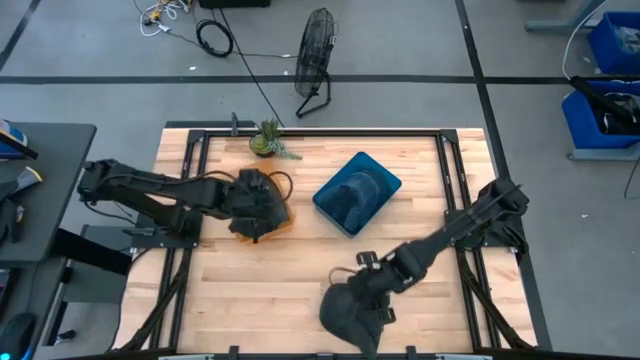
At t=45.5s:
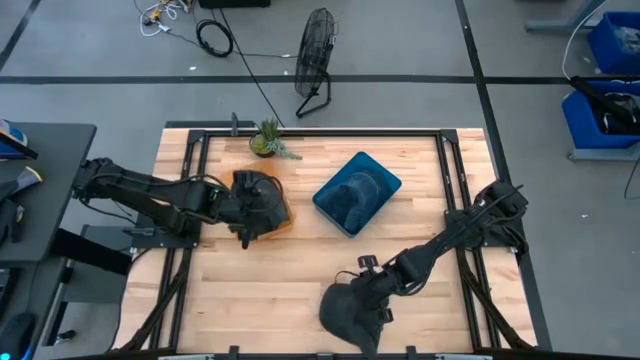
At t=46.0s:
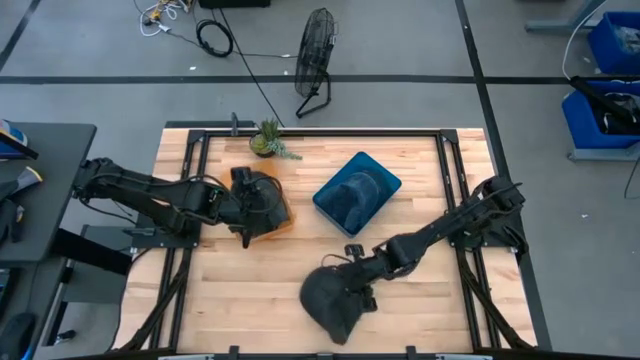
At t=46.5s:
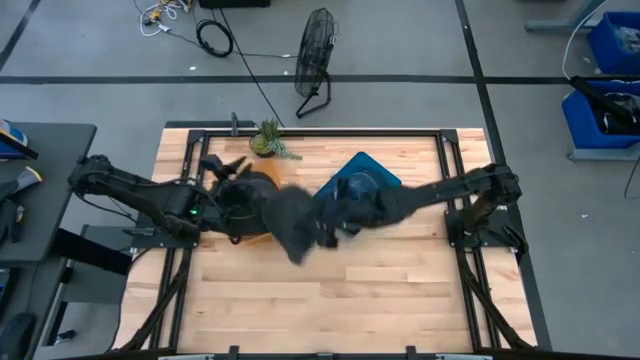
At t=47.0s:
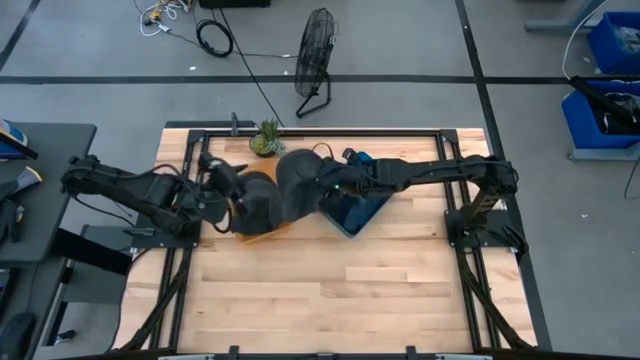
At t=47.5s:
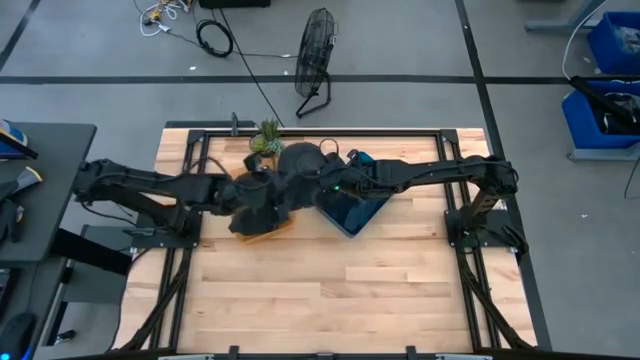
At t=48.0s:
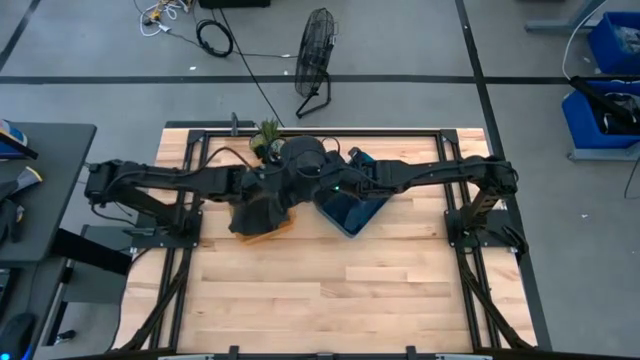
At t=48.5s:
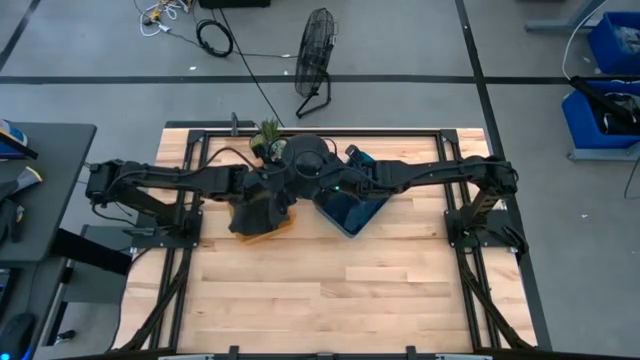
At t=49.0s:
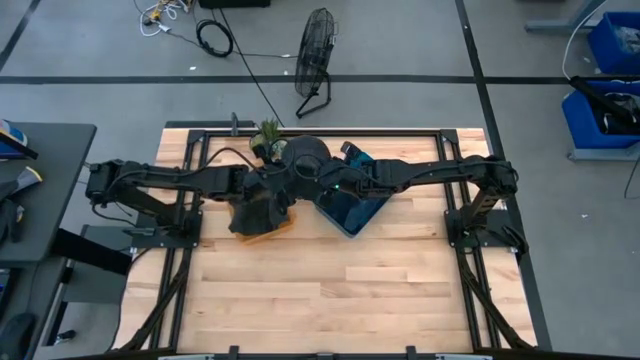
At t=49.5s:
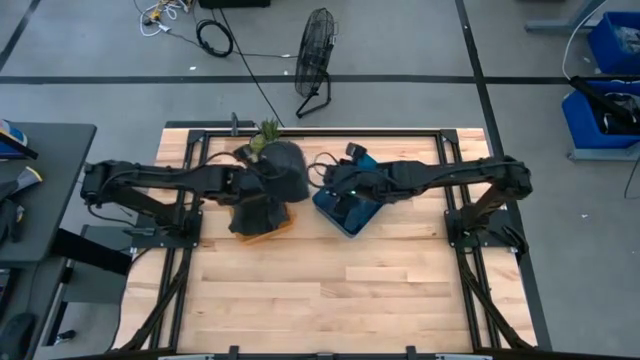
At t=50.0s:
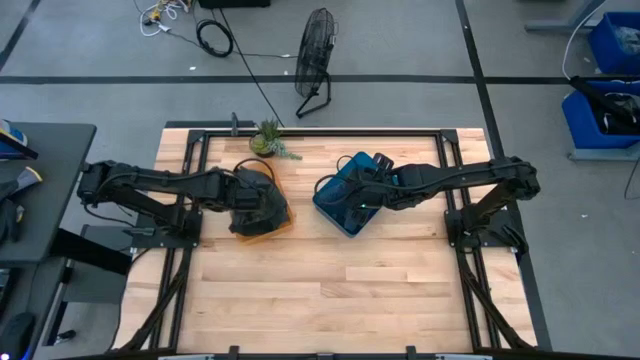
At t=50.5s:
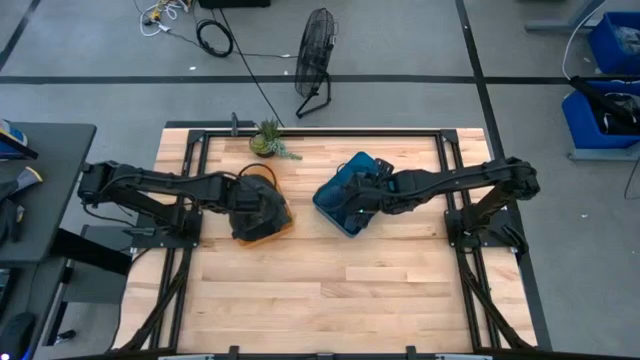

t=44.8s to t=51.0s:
Task: Pick & Place hat
Put the black cap into the orange bin

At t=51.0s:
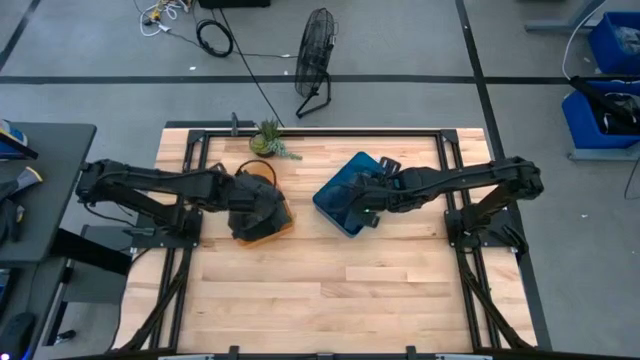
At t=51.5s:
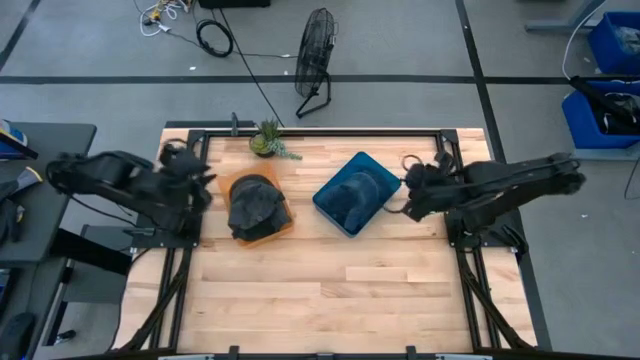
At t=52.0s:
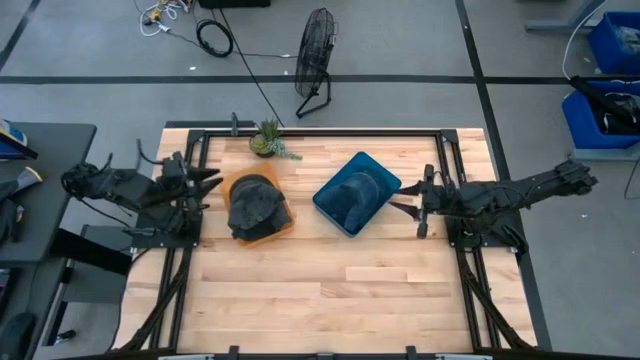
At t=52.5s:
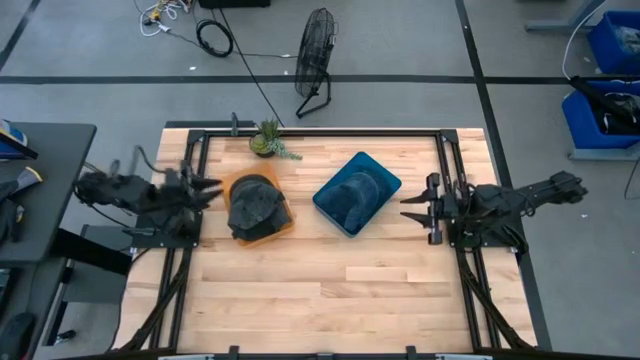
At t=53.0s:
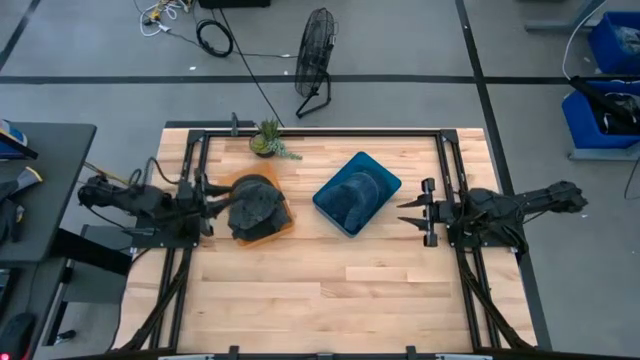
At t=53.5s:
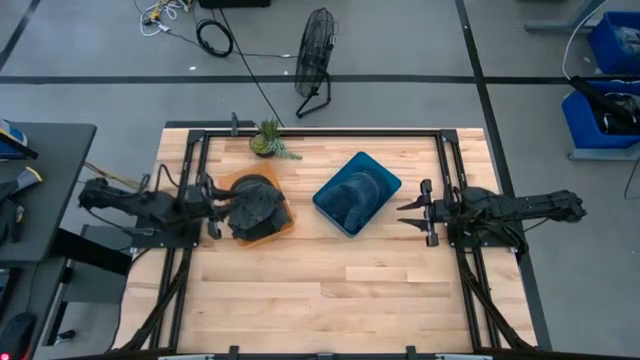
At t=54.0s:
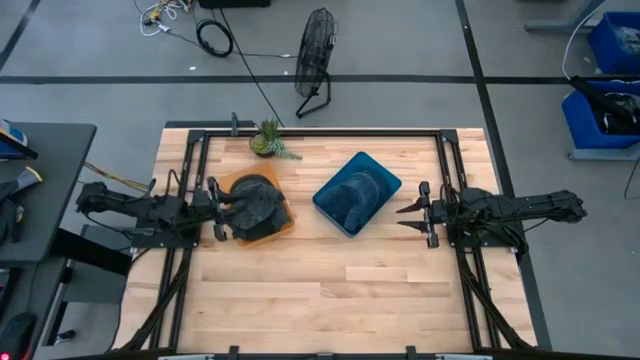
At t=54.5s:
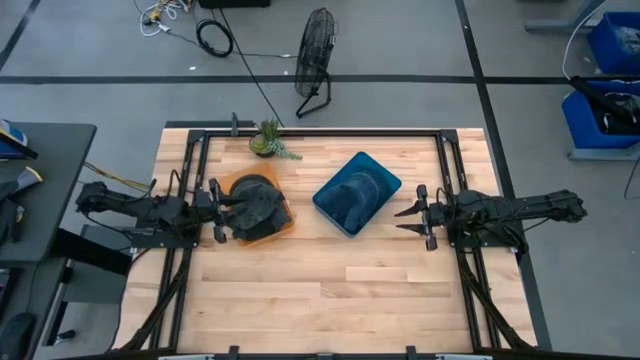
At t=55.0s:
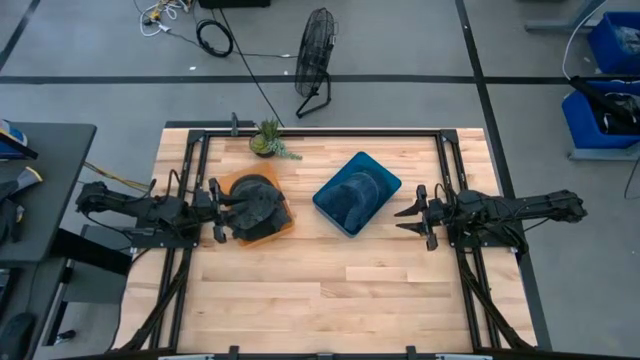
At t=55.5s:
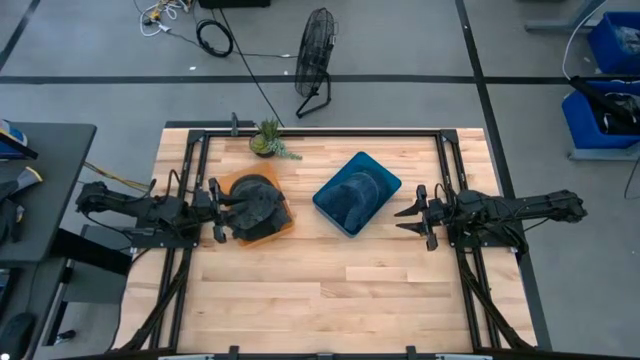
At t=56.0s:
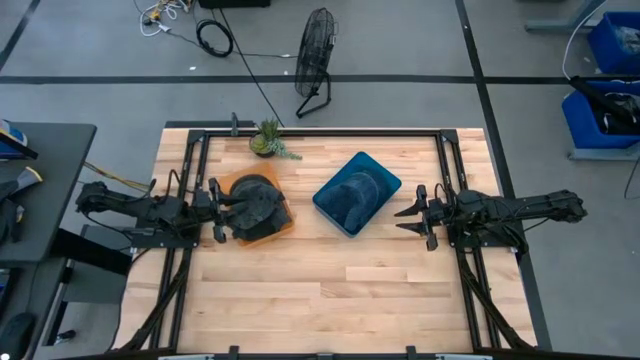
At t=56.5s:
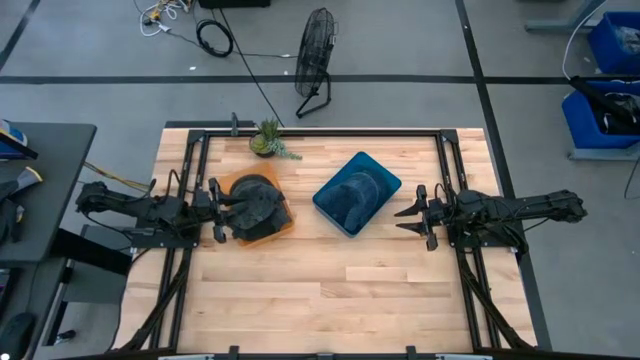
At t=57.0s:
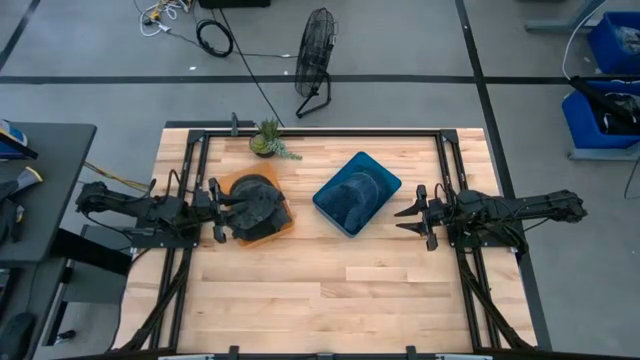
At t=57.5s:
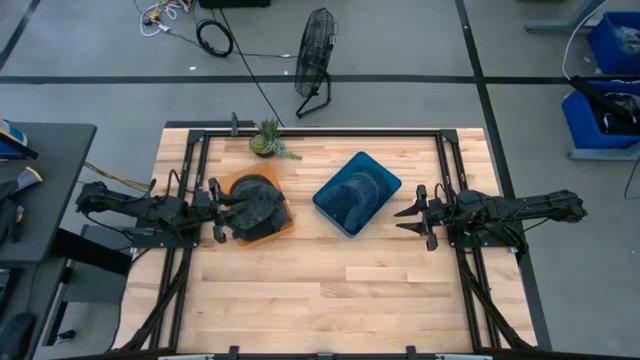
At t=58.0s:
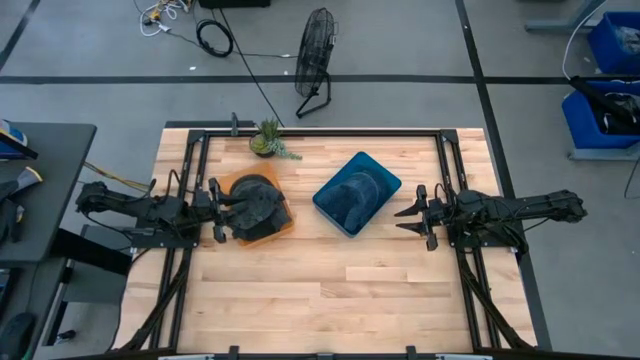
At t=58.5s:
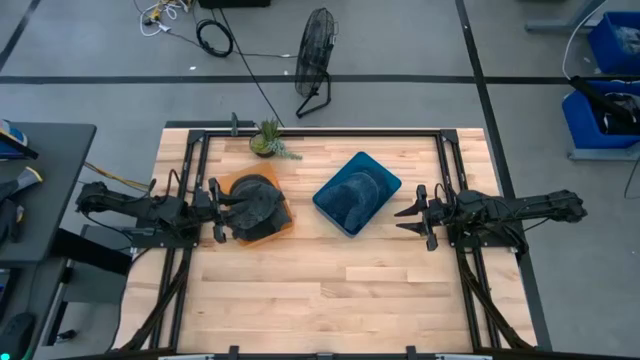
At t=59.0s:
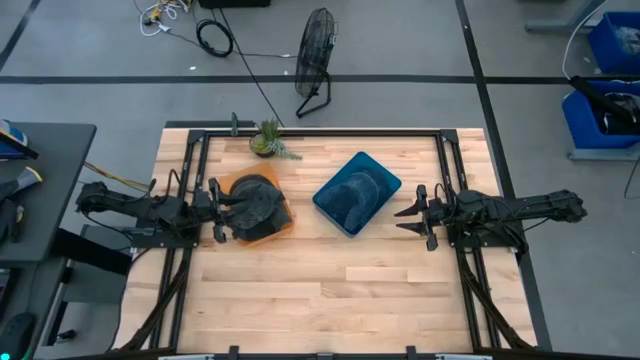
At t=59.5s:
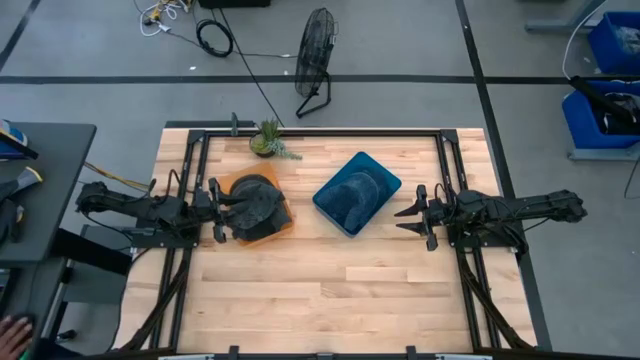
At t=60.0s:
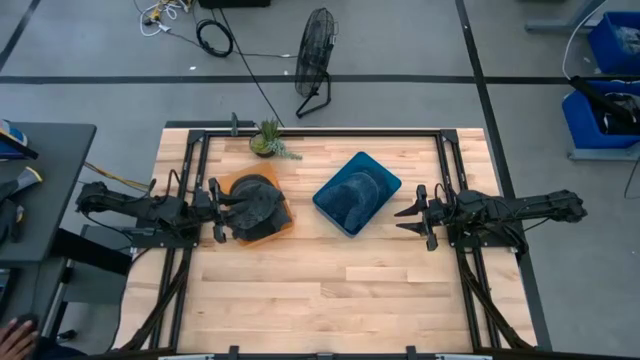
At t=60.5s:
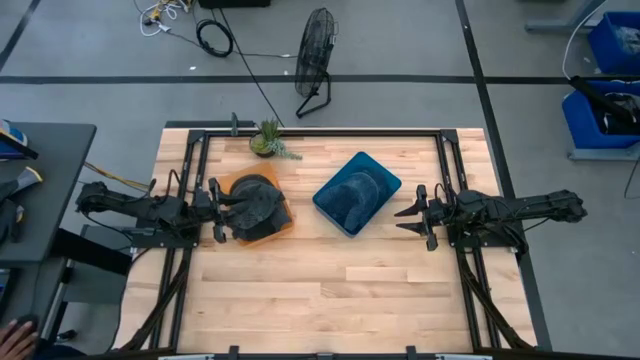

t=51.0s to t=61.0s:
Return to Home Position

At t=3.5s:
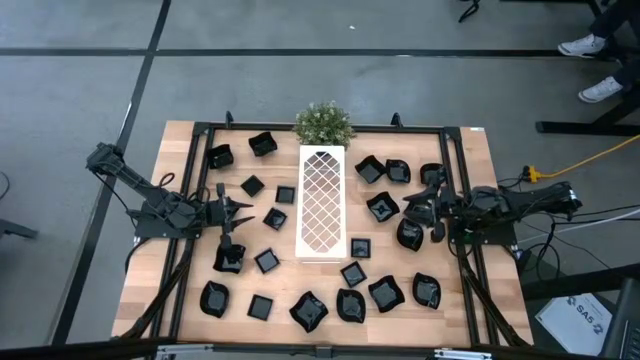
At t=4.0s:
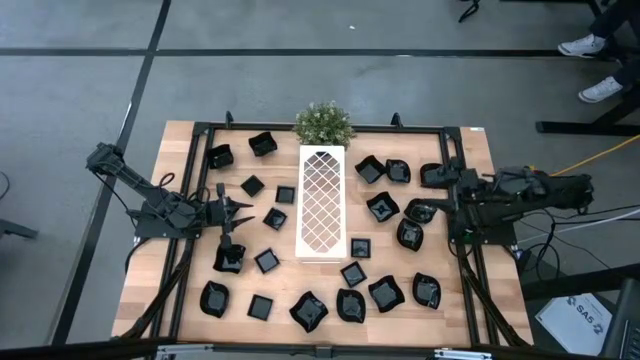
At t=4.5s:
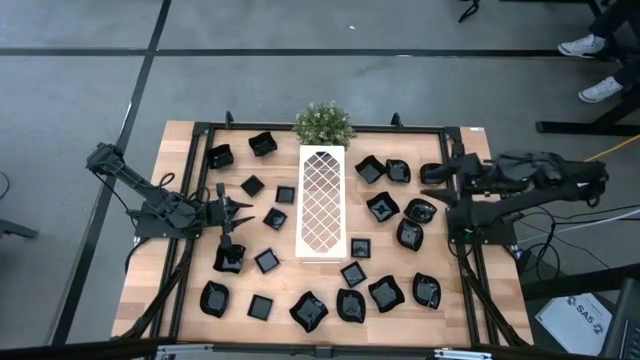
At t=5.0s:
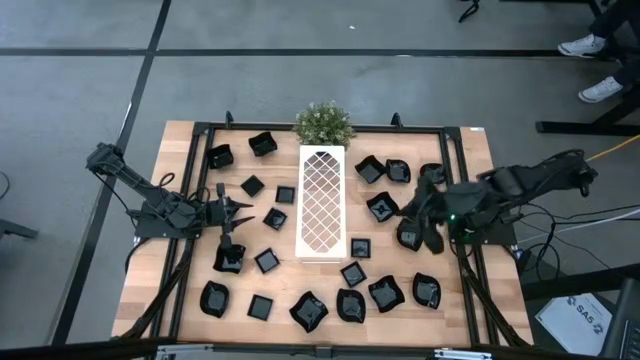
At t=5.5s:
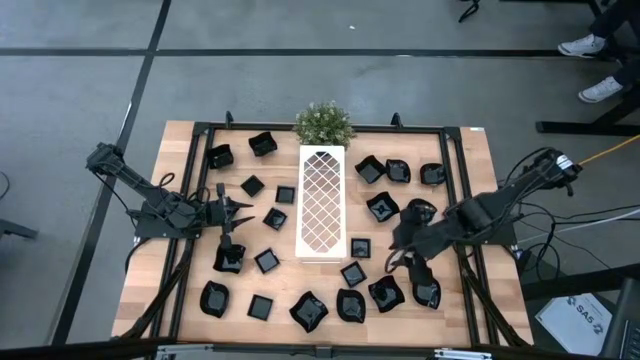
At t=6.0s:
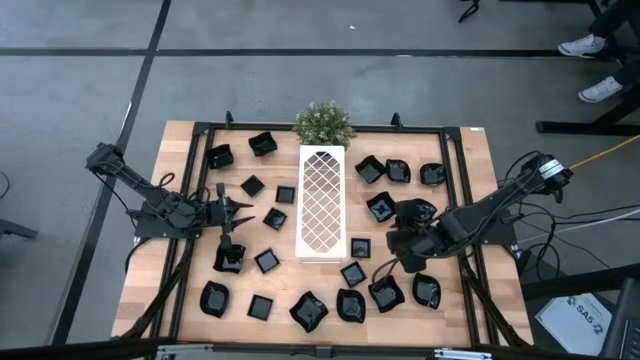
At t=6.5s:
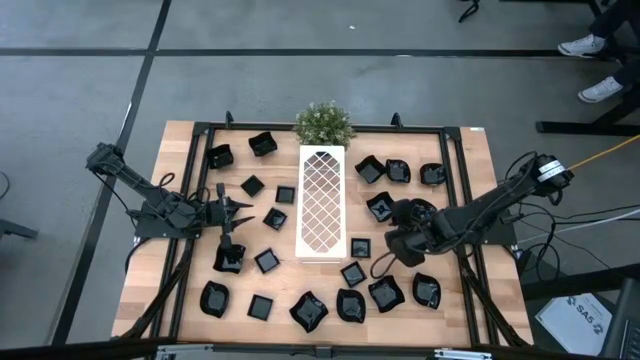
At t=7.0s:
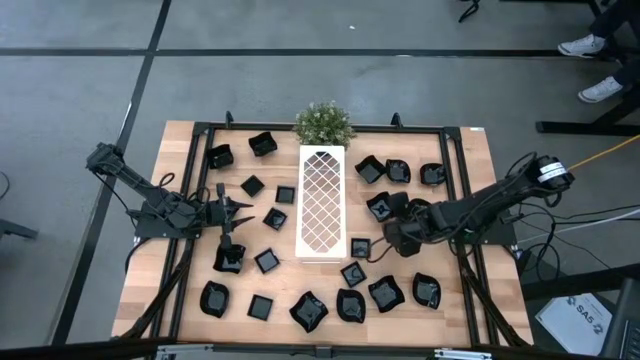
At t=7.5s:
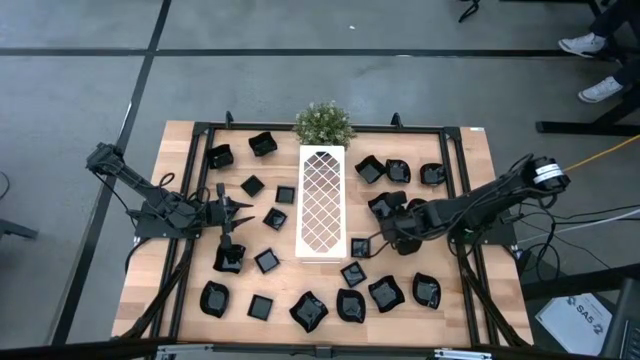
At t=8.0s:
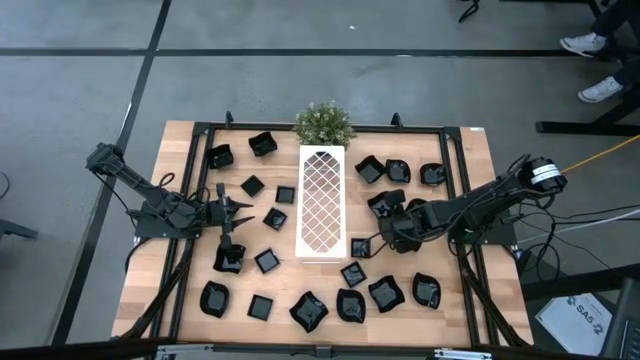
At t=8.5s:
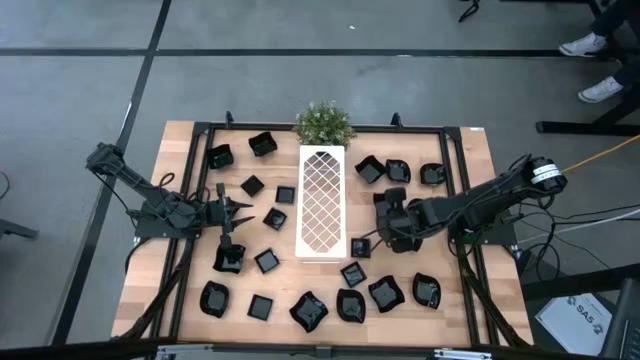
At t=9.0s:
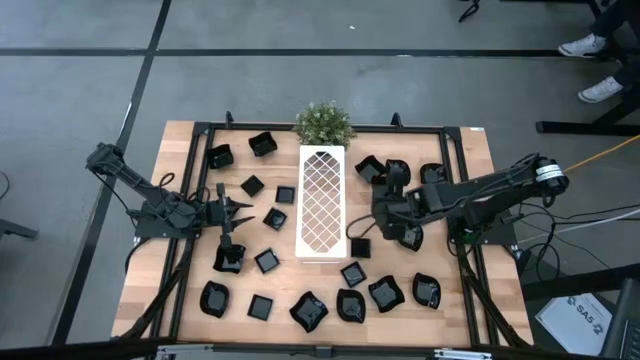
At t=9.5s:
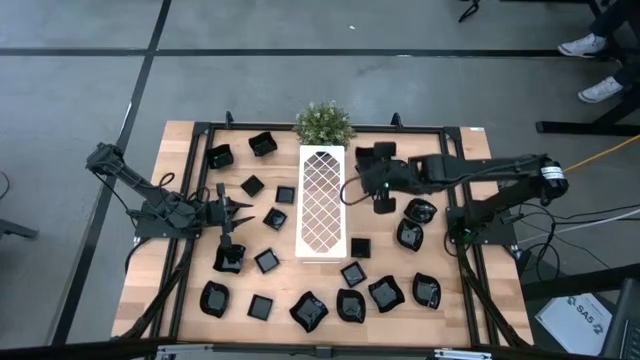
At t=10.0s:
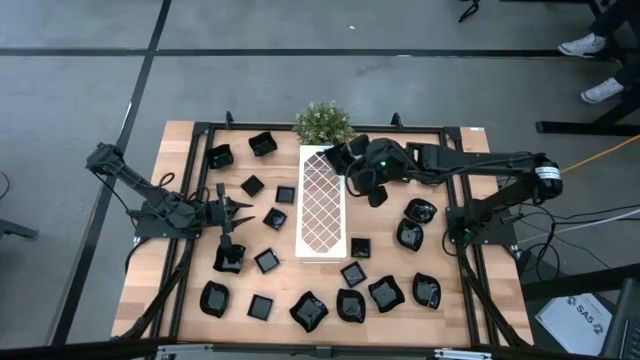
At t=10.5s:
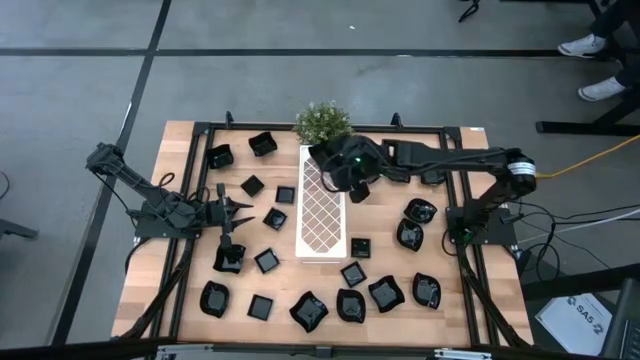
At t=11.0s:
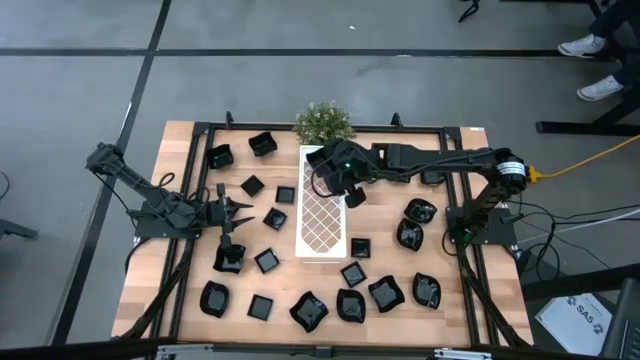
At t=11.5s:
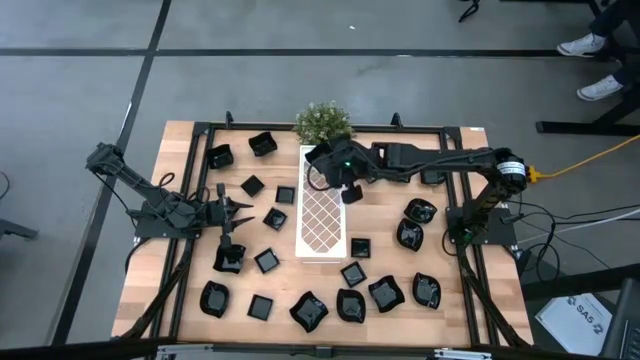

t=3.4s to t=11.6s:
Task: Pick & Place Mini shaped plates
Put the distorted square plate on the shelf
